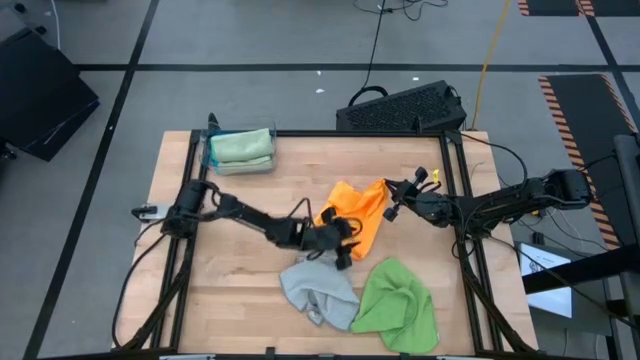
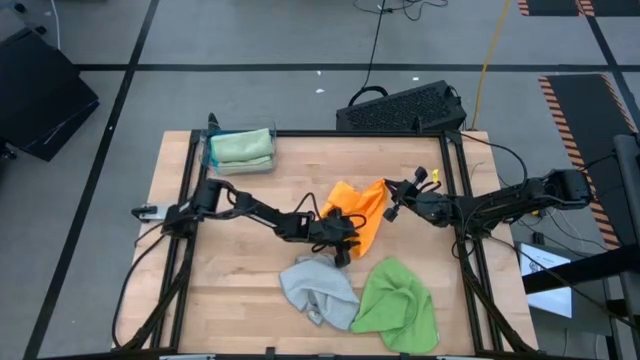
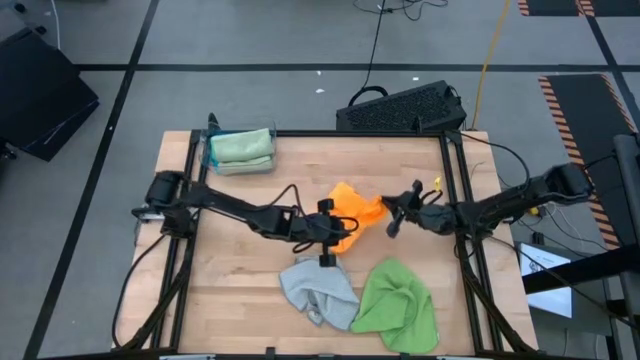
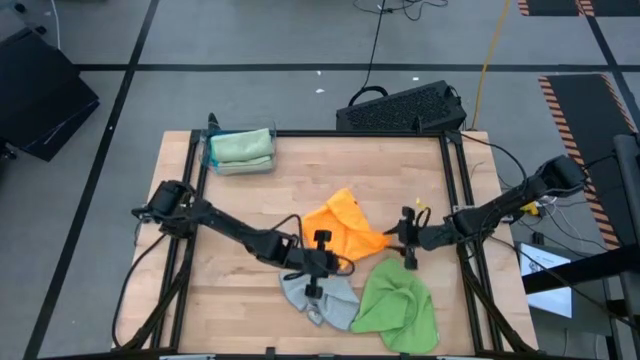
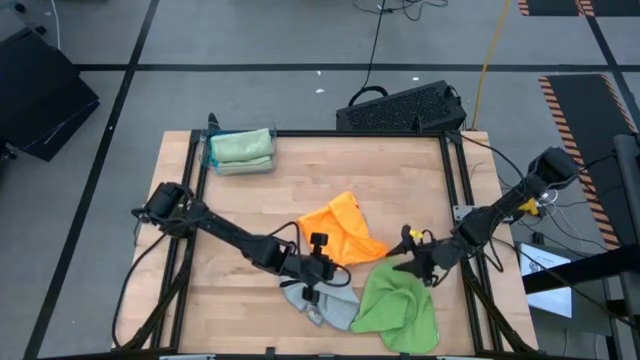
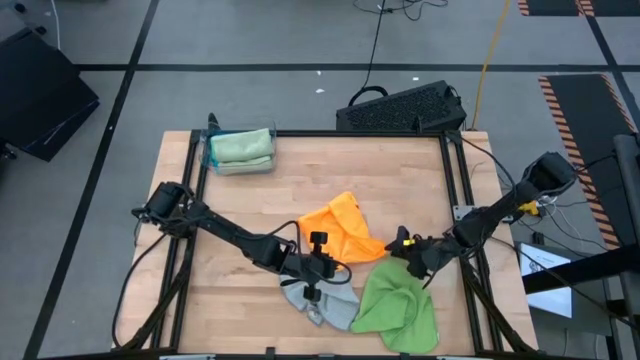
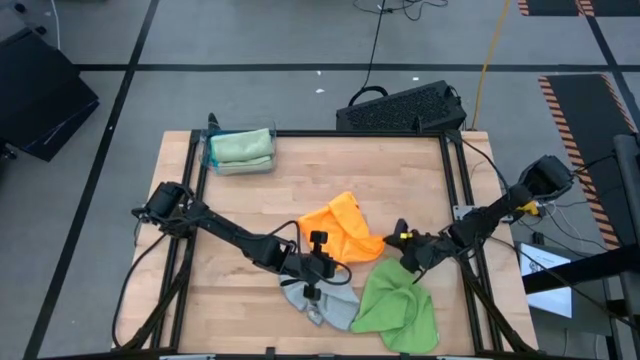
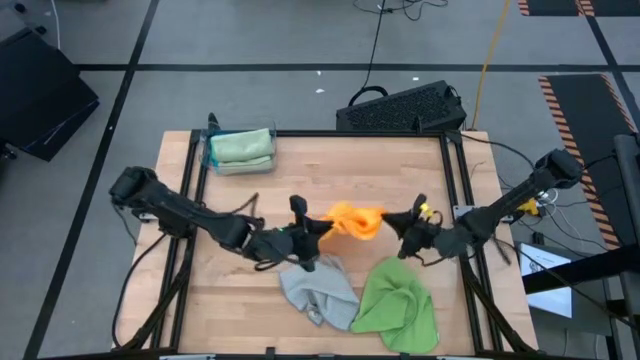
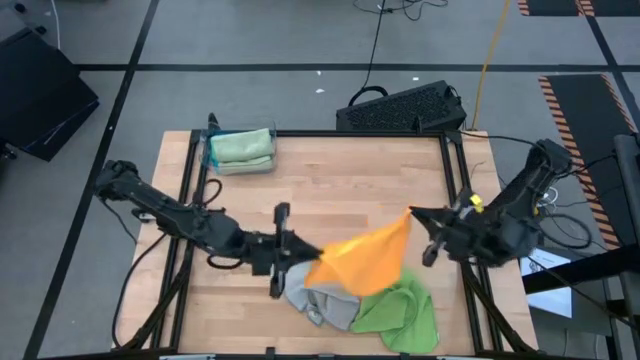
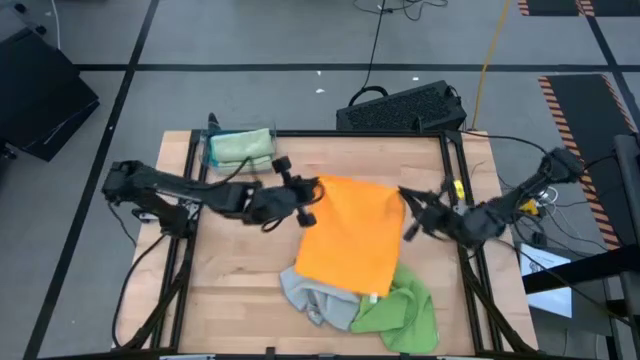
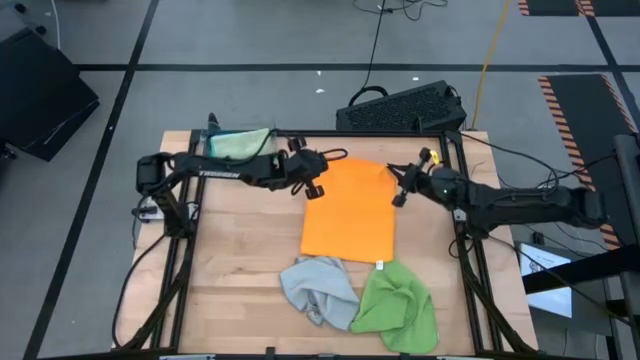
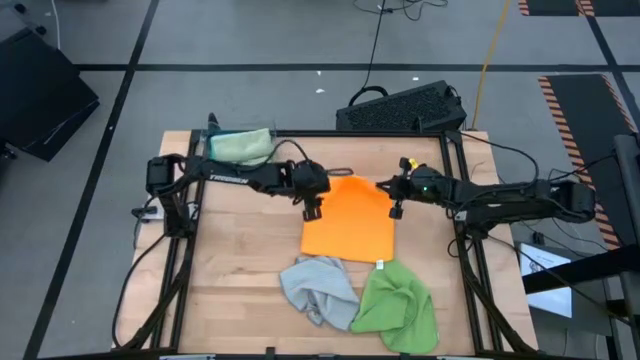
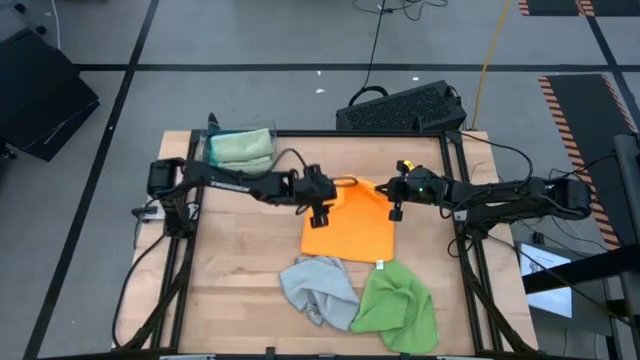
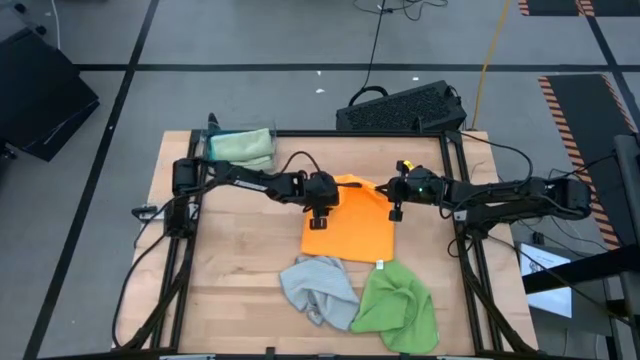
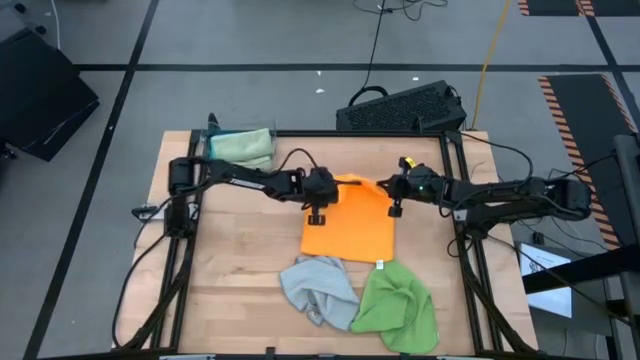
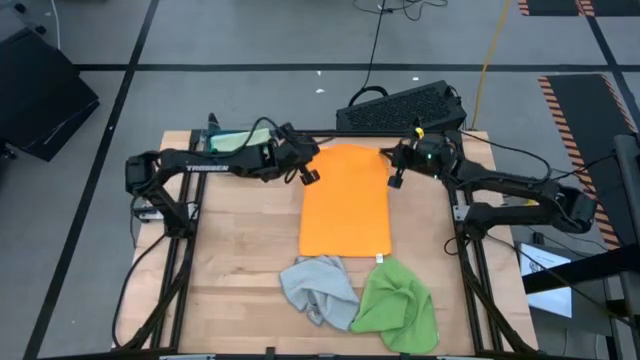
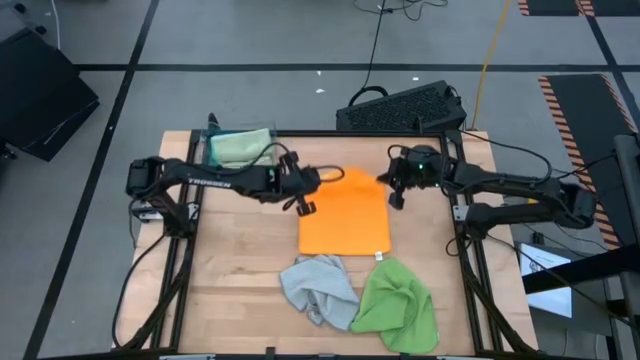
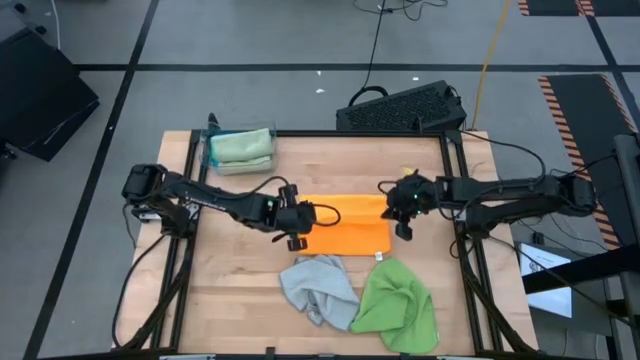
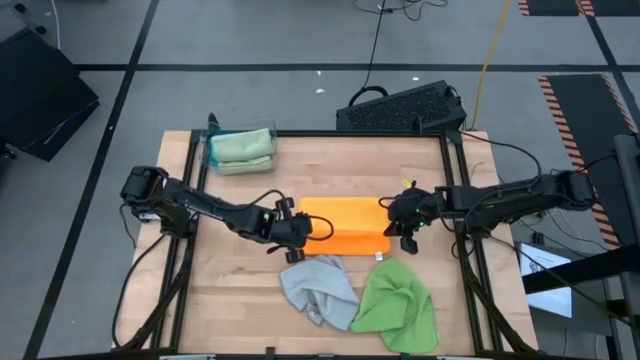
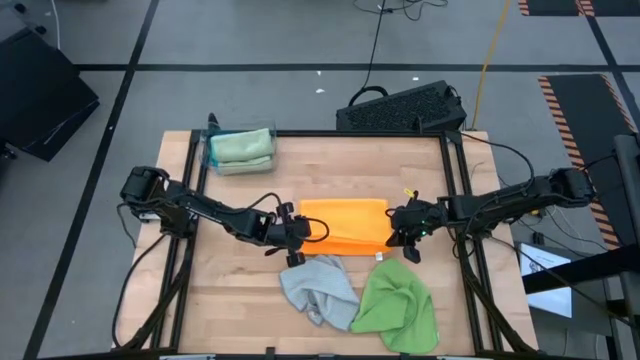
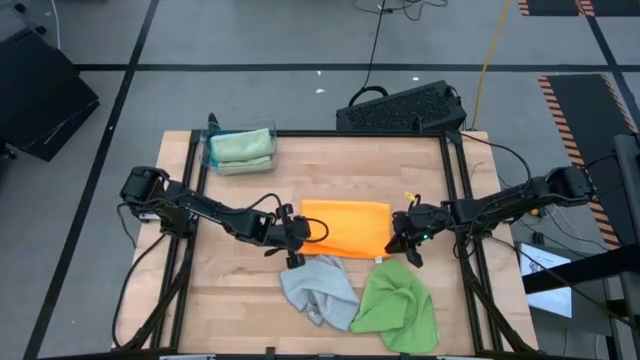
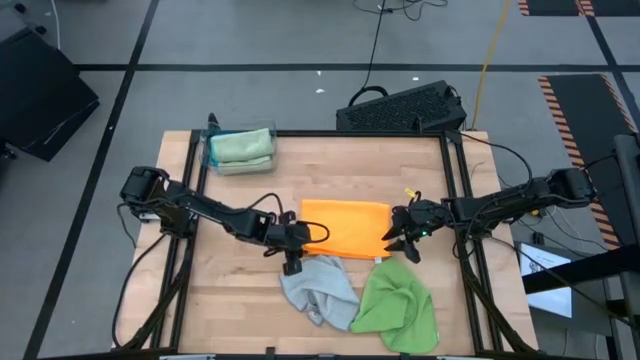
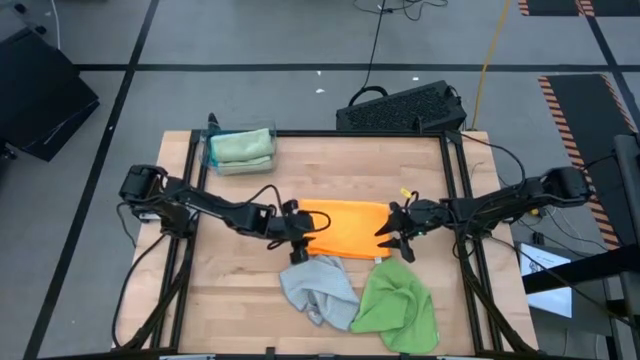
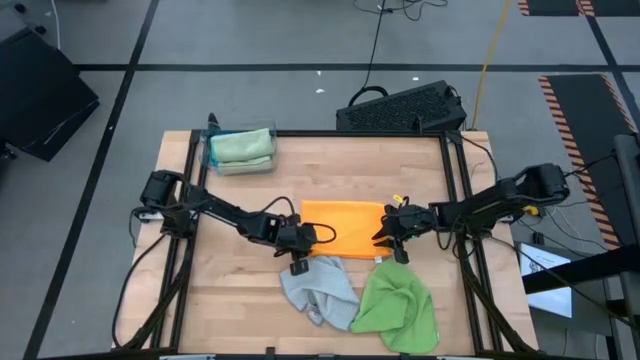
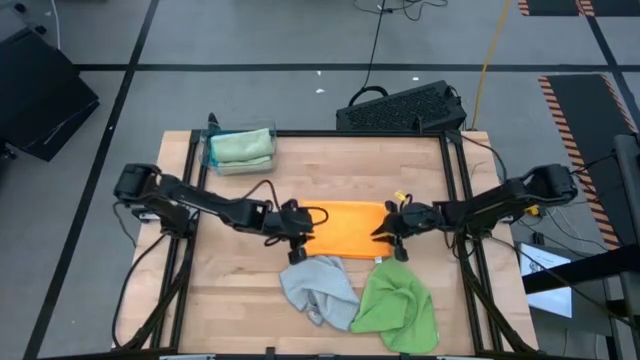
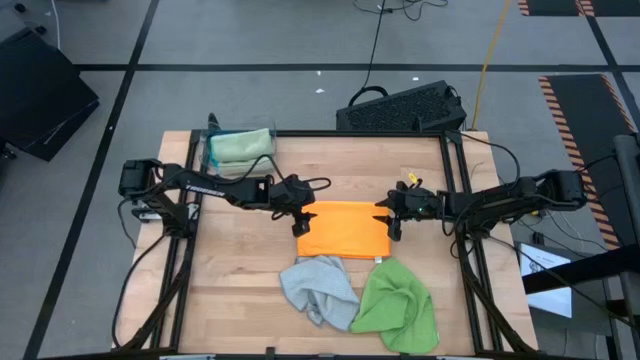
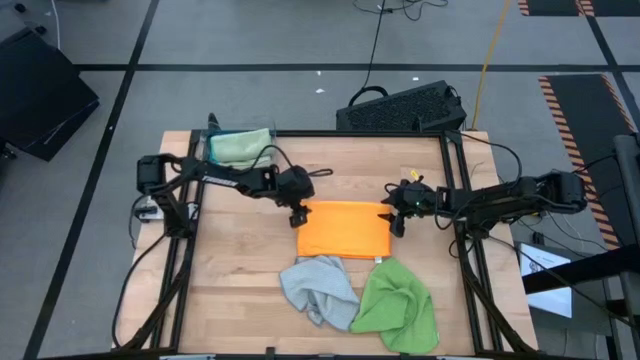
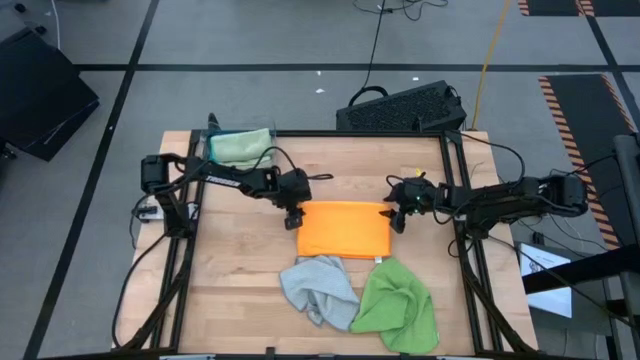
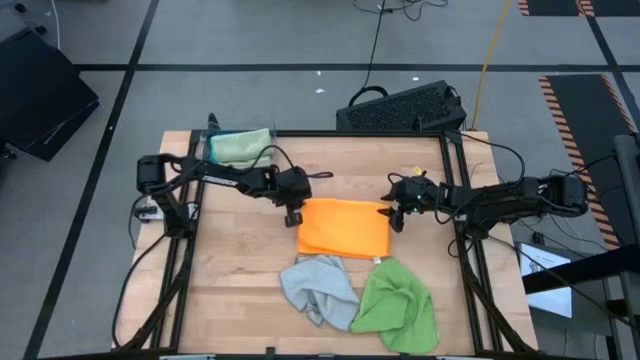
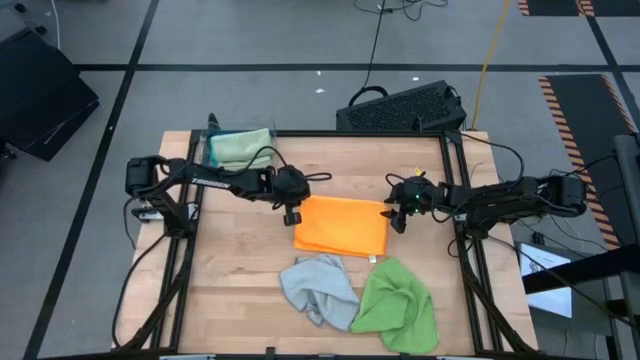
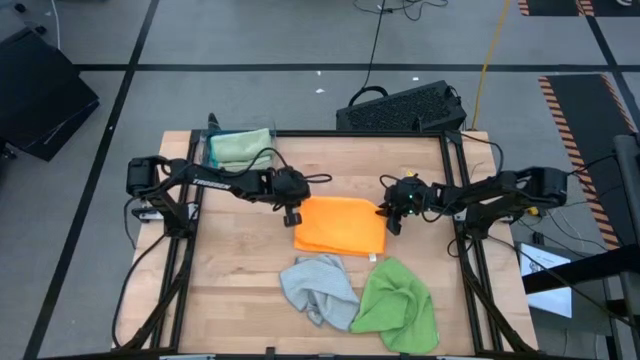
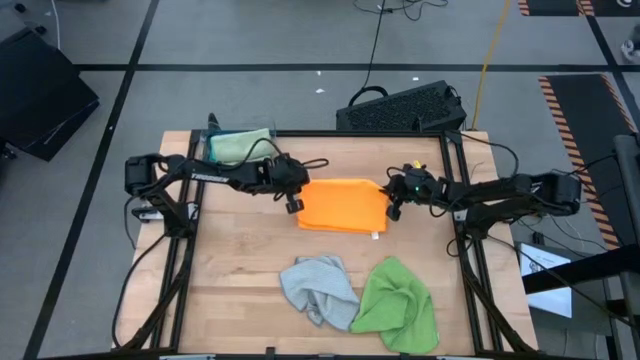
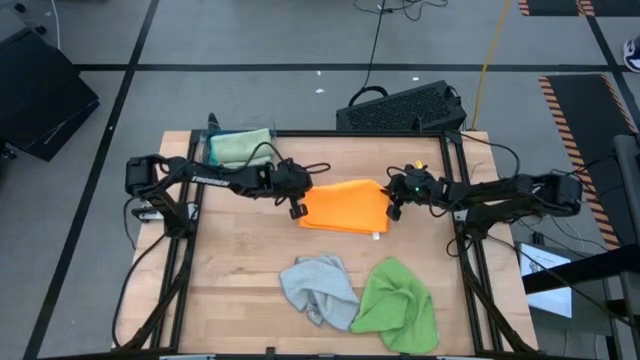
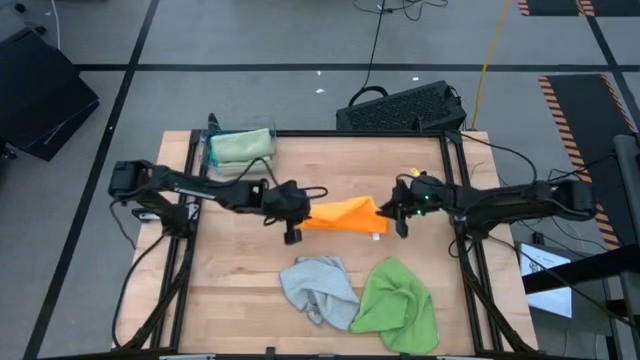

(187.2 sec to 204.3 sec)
Task: Fold microfiber towels
Fold the orange microfiber cloth

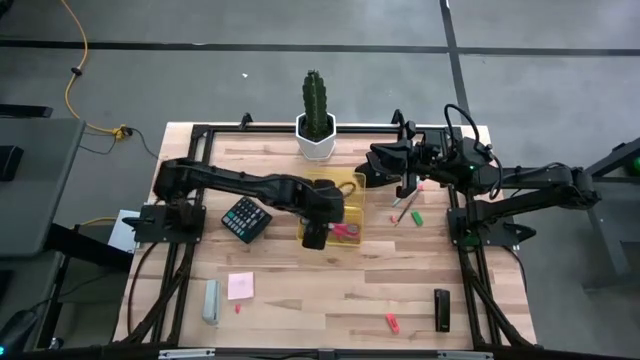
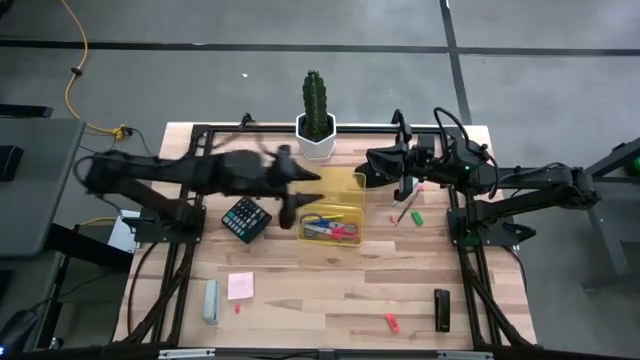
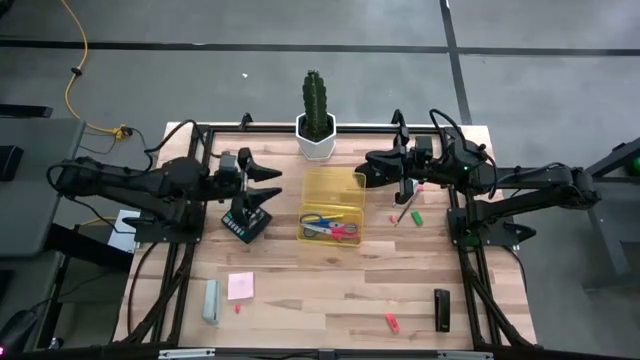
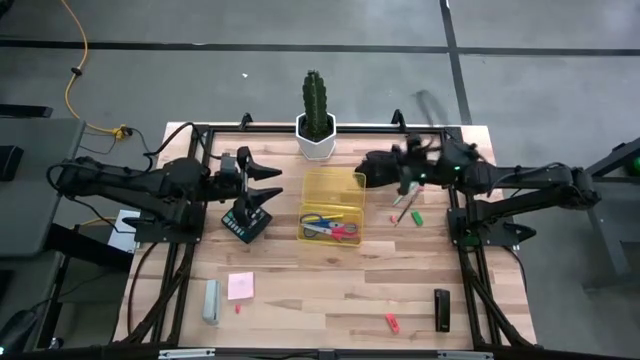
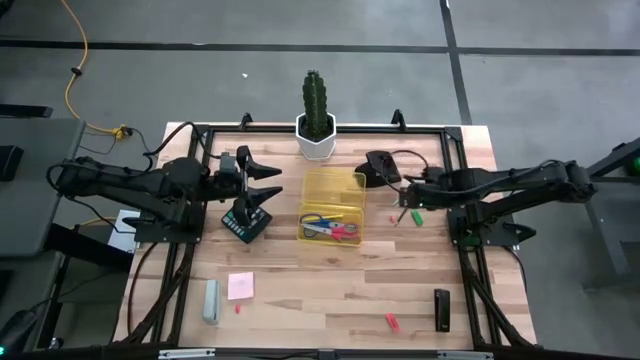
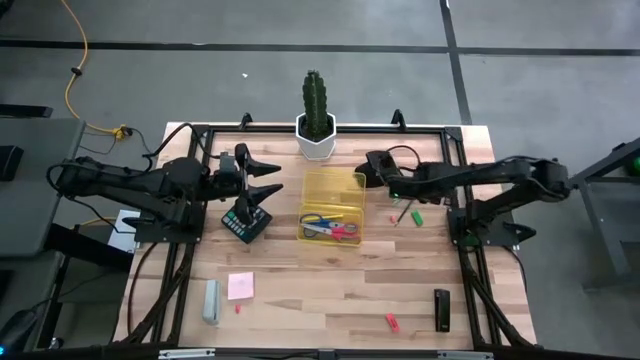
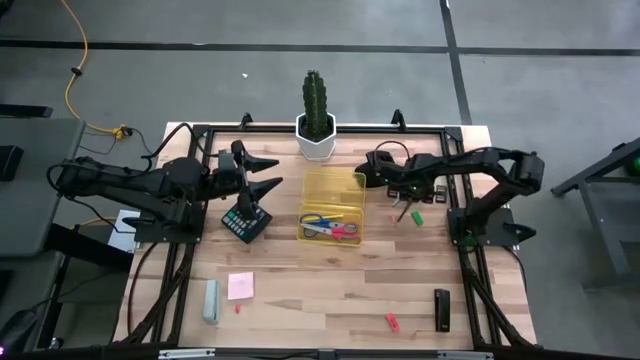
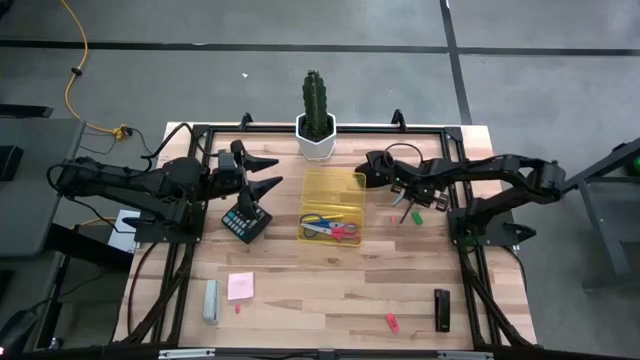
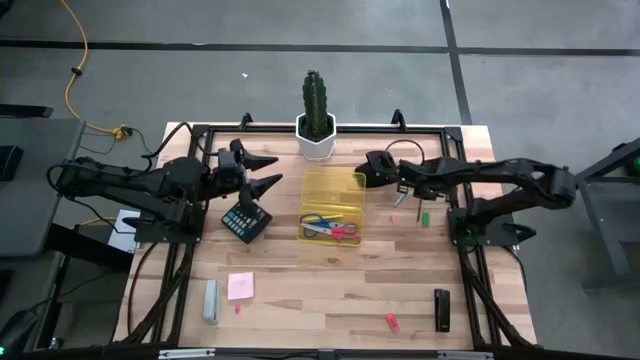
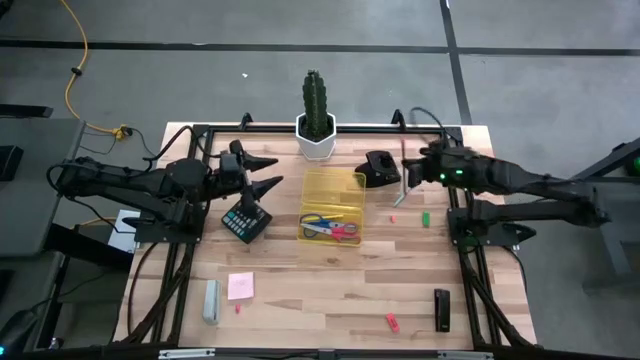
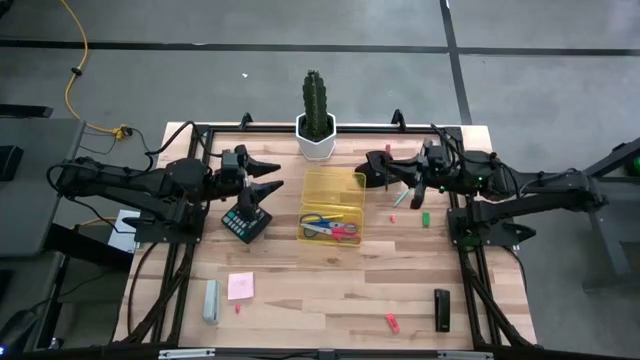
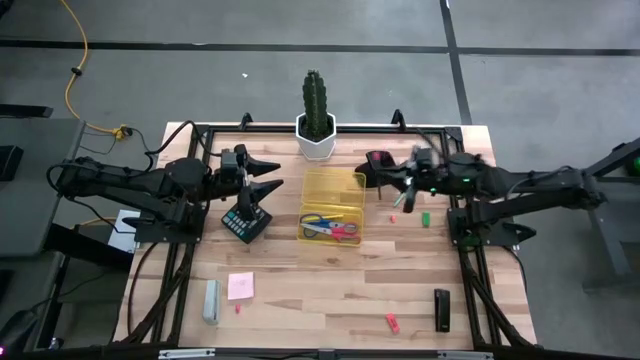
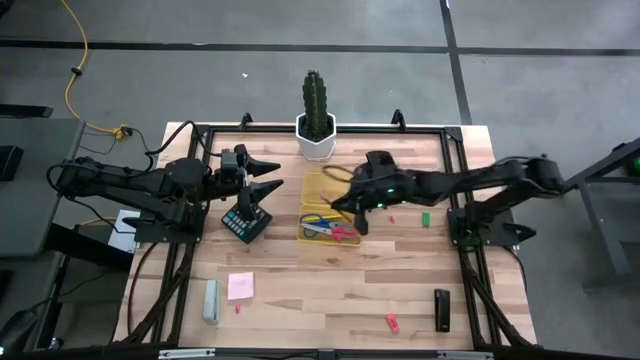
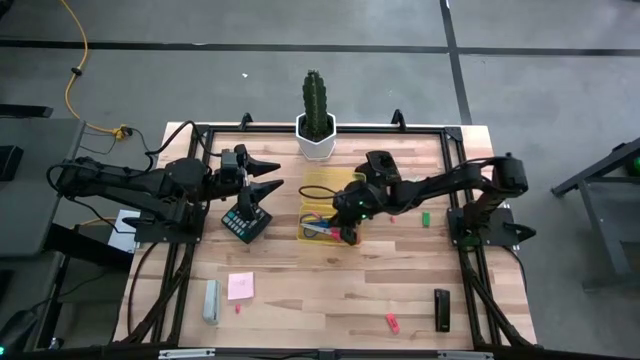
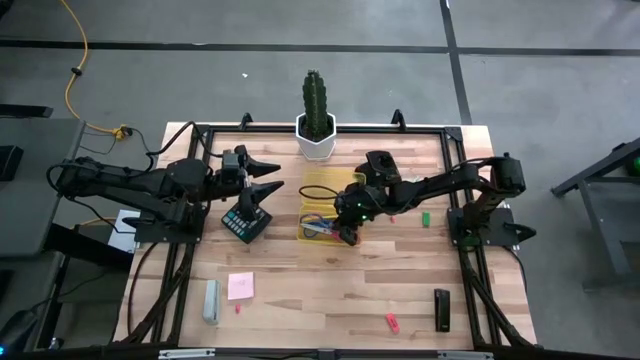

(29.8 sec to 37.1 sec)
Task: Pack school essentials
Put the pencil into the supply box
